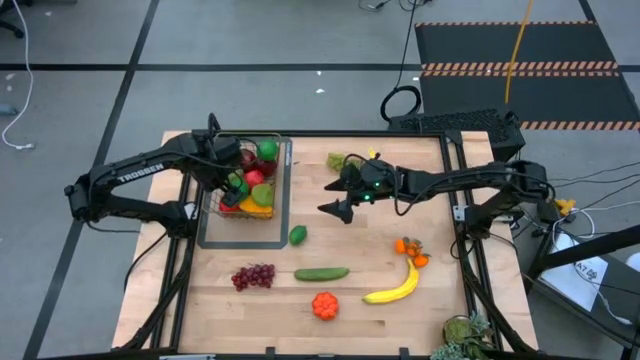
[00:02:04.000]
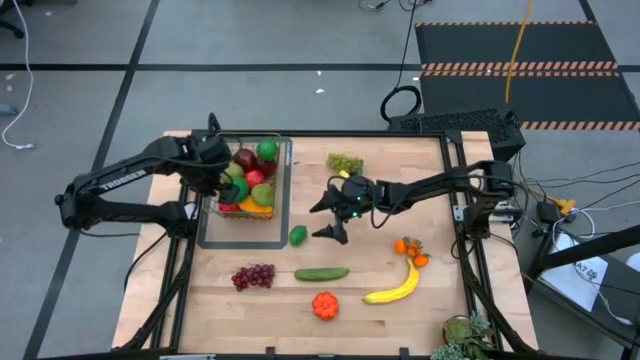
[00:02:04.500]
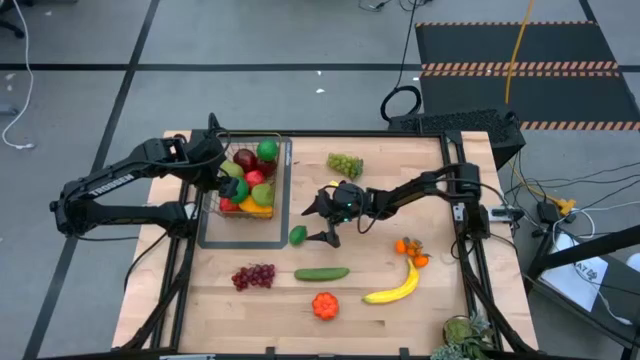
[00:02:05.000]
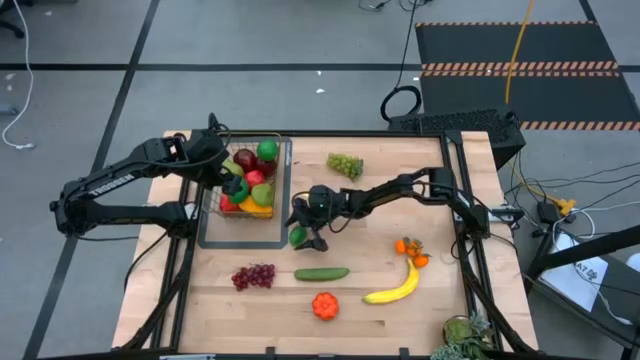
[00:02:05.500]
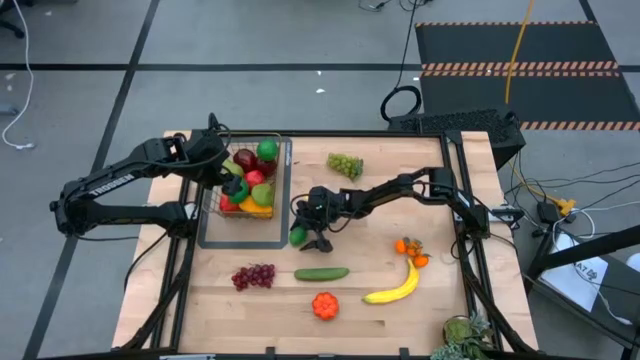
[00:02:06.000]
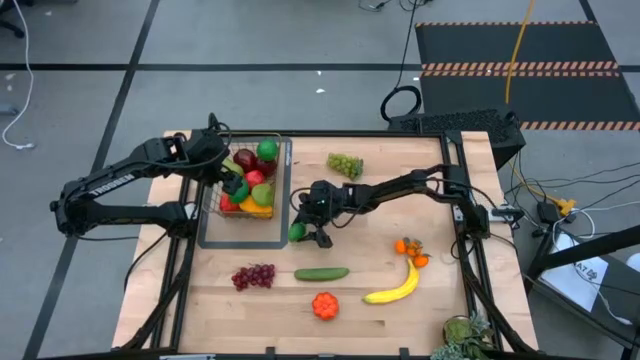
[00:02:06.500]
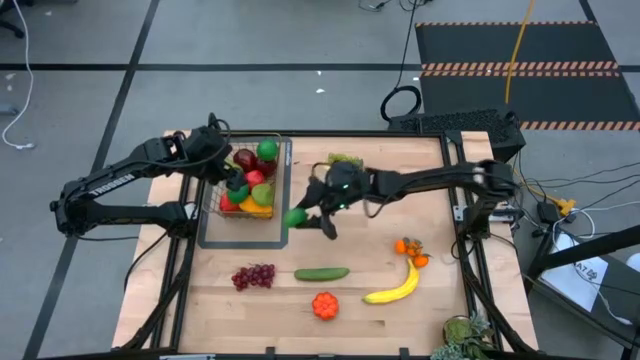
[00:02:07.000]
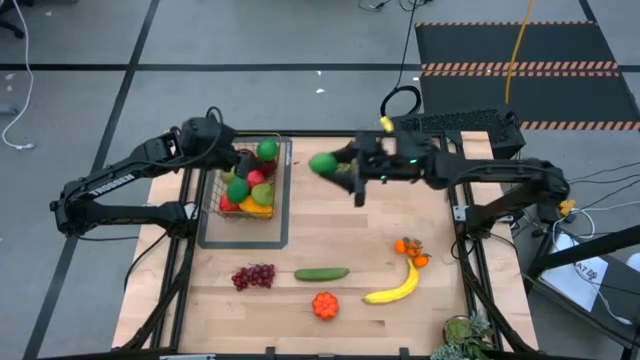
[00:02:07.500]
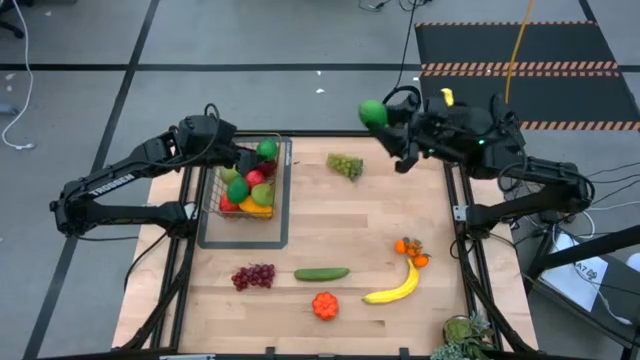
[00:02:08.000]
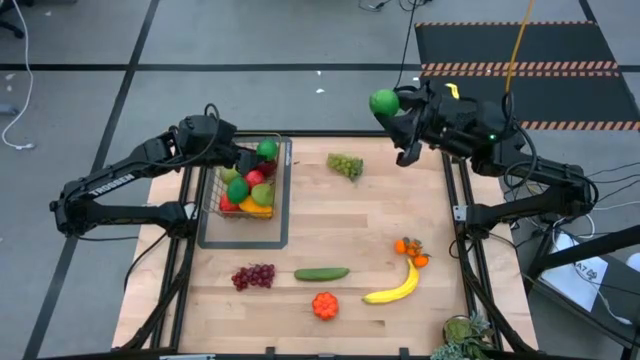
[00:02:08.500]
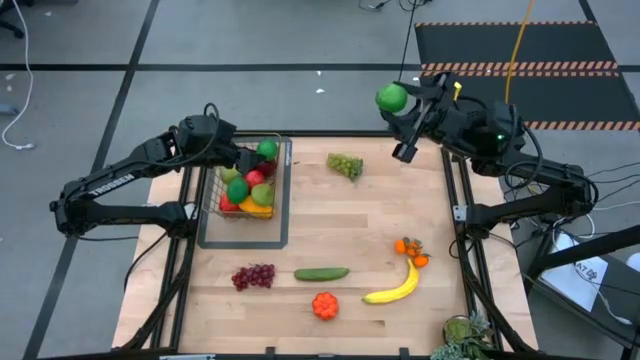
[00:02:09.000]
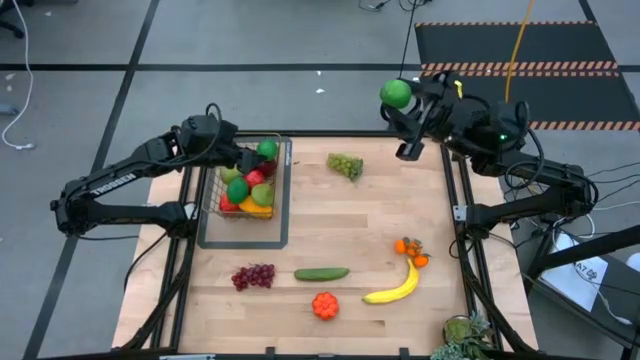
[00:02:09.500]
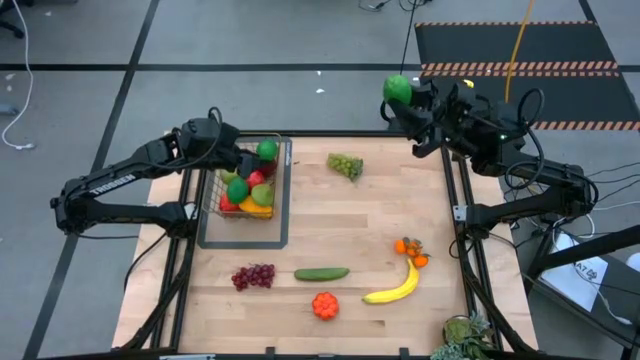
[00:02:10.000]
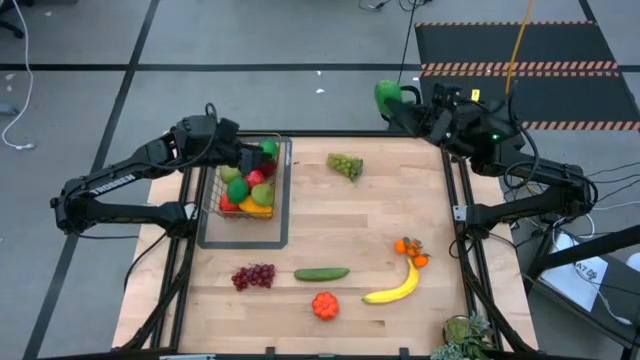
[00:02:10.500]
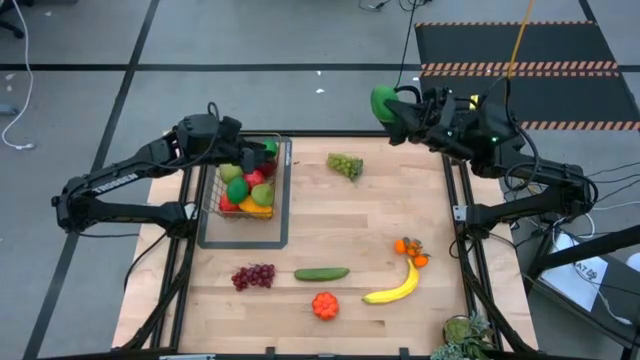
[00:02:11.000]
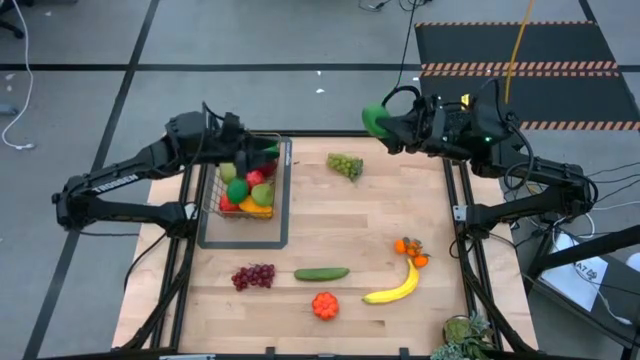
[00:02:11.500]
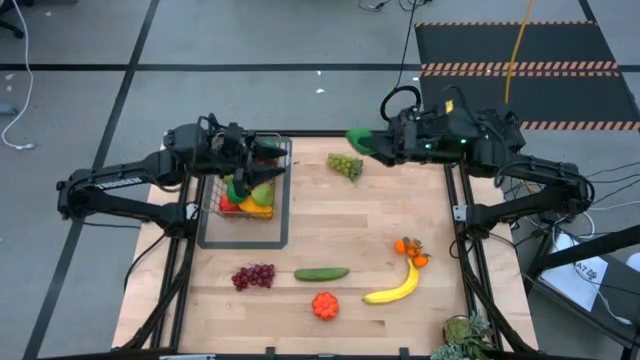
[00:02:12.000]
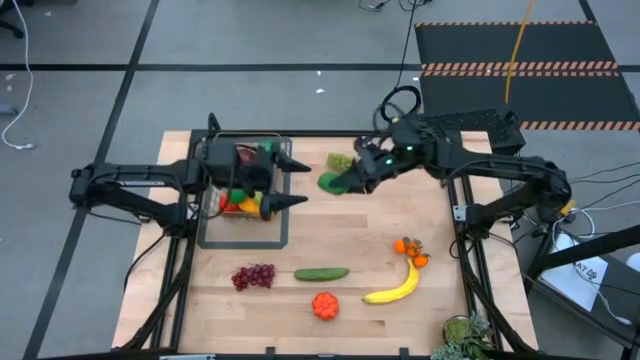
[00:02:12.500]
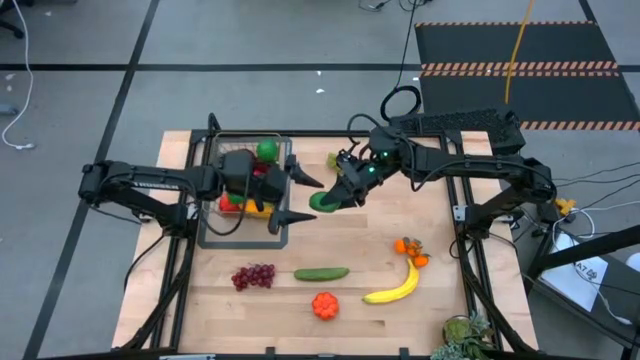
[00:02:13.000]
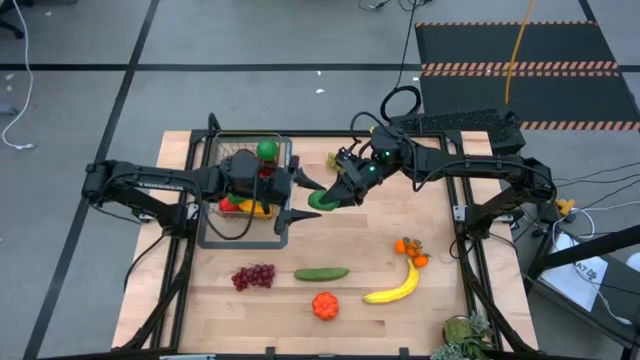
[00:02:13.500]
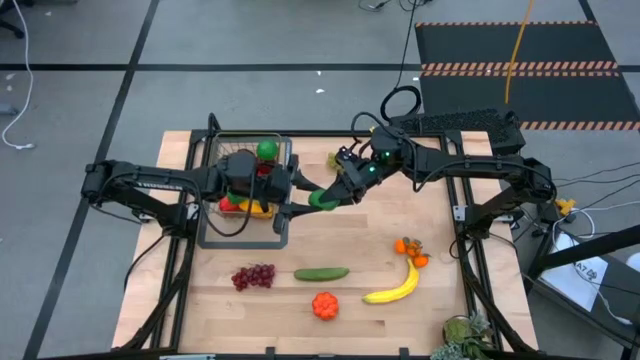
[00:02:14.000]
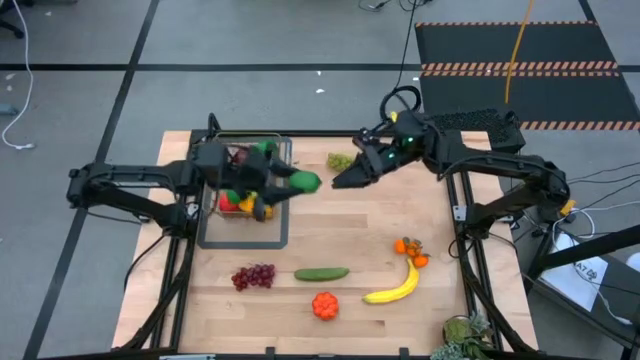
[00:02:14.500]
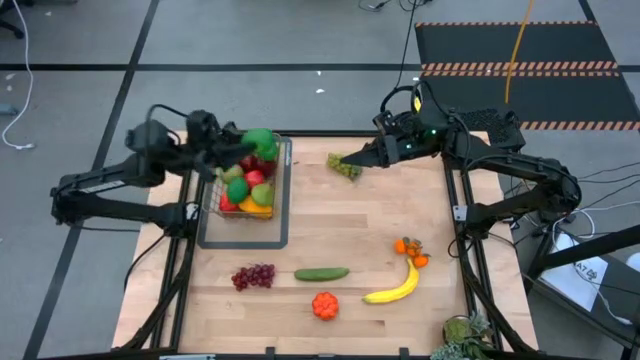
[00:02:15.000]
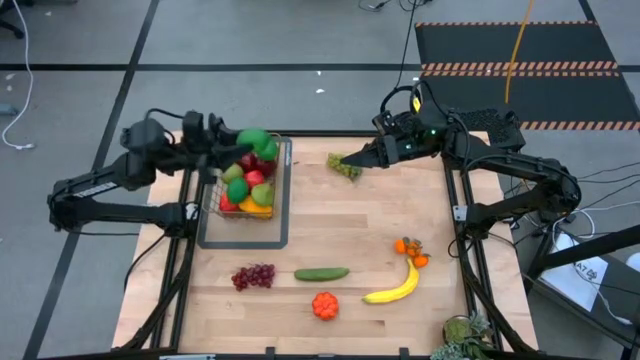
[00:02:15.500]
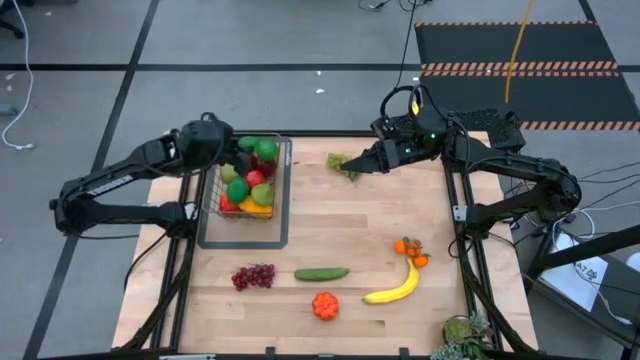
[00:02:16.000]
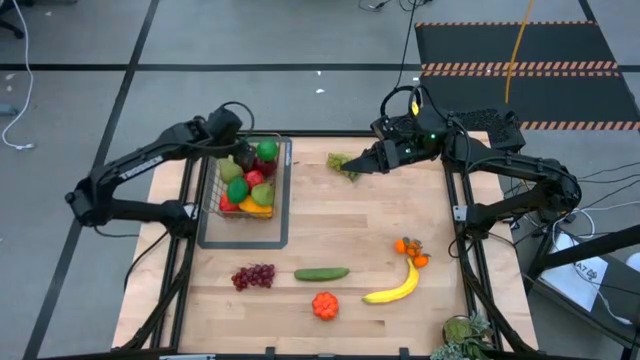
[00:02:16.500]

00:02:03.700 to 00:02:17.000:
Task: Build produce basket
Put the lime into the wire basket

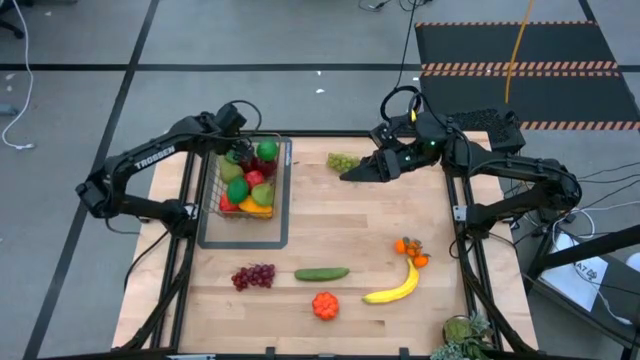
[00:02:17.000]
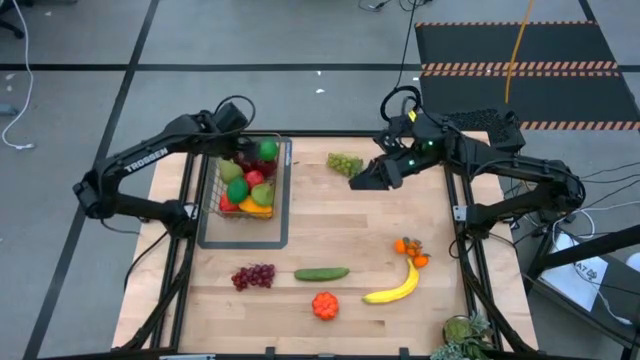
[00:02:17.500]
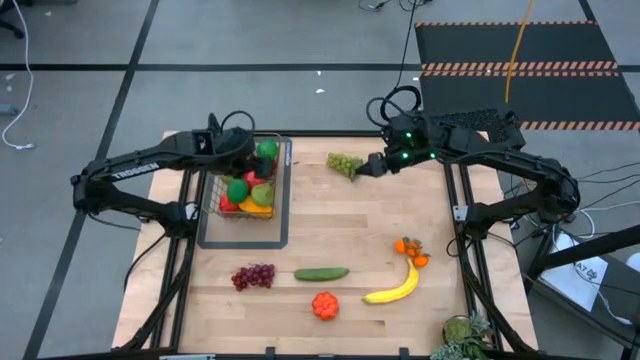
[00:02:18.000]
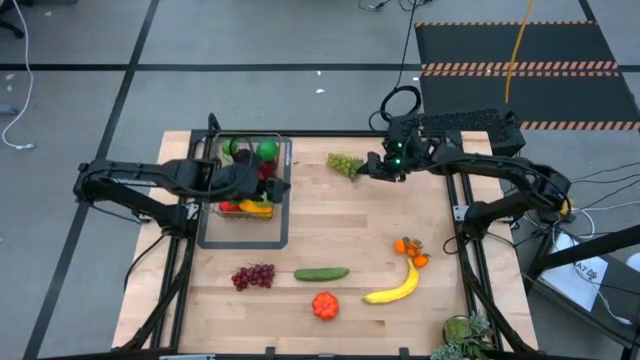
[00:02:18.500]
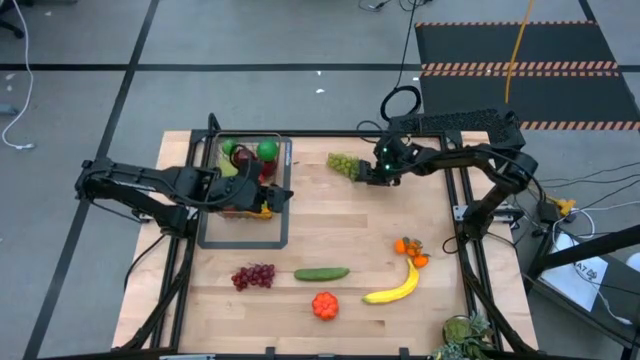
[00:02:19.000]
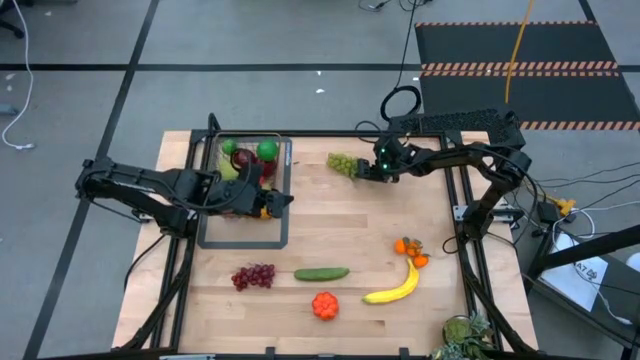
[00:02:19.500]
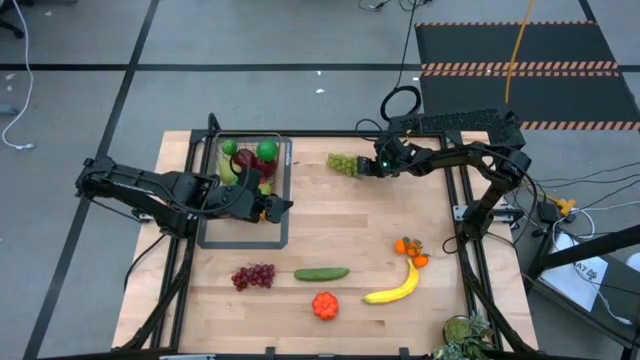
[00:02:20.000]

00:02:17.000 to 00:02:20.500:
Put the cucumber into the wire basket

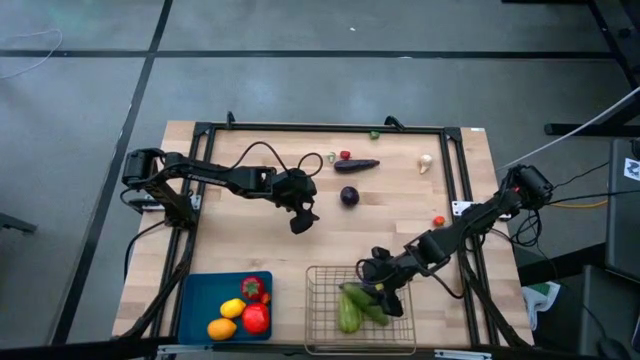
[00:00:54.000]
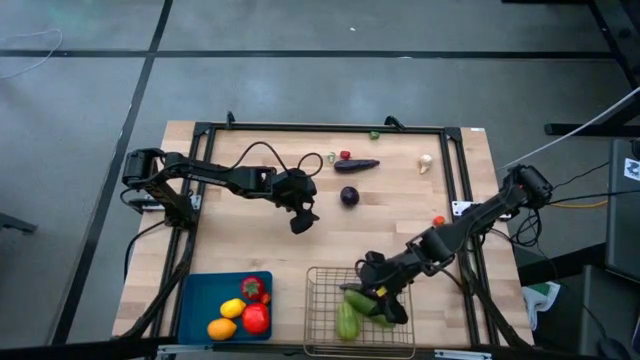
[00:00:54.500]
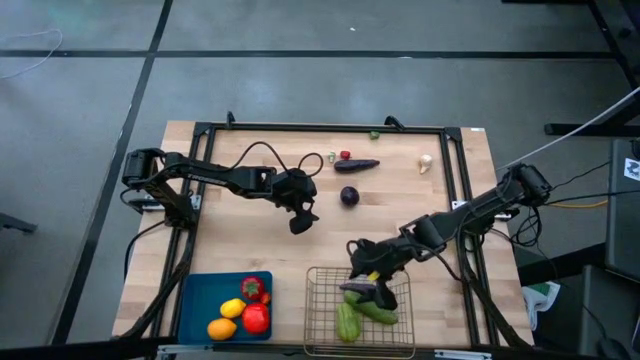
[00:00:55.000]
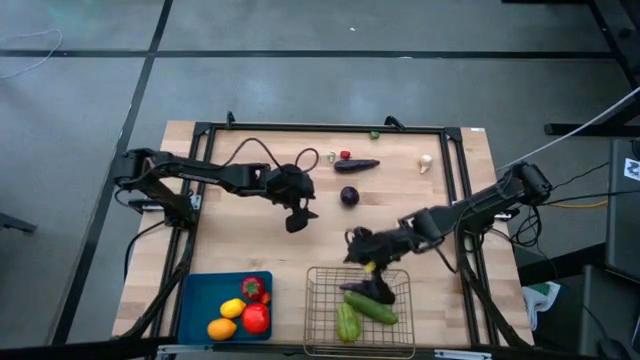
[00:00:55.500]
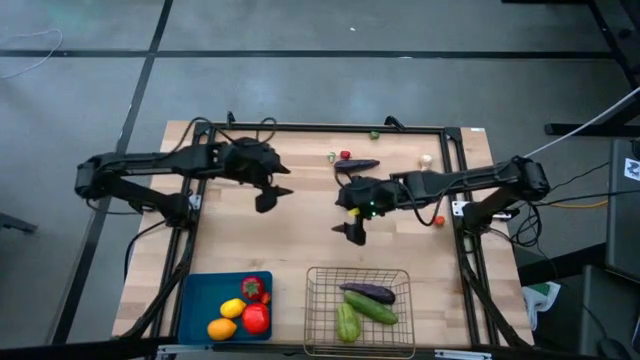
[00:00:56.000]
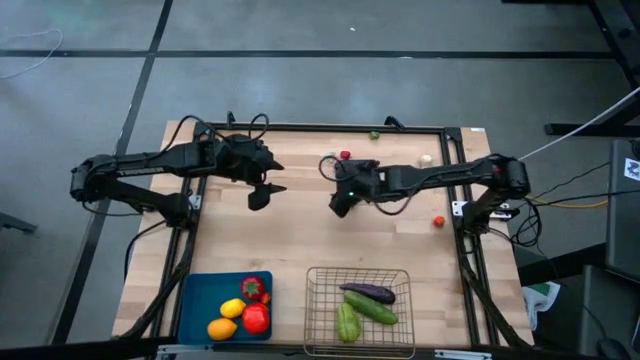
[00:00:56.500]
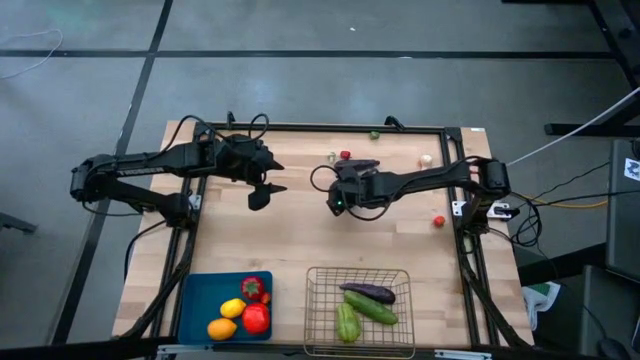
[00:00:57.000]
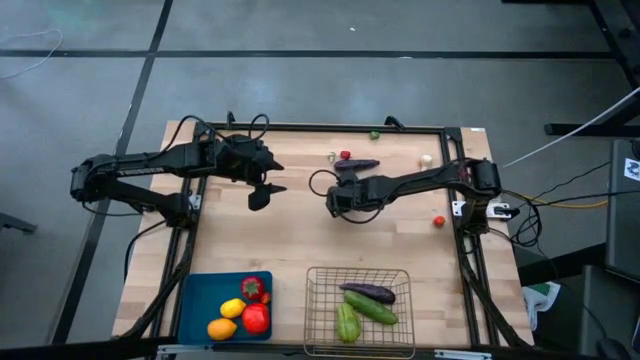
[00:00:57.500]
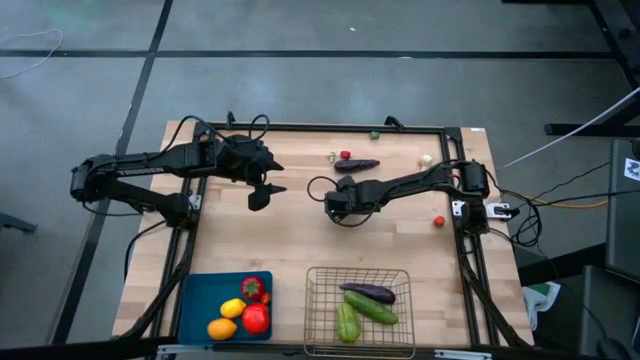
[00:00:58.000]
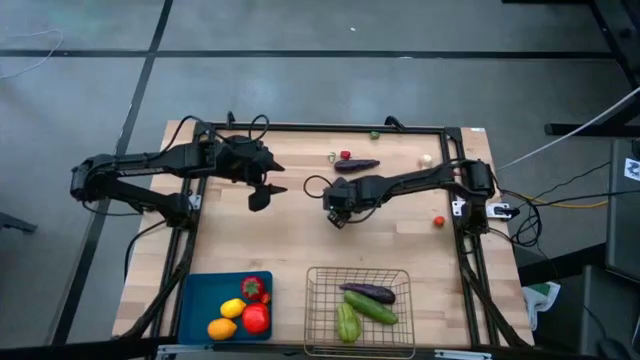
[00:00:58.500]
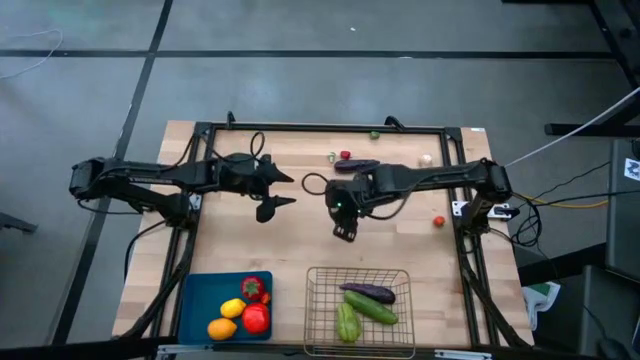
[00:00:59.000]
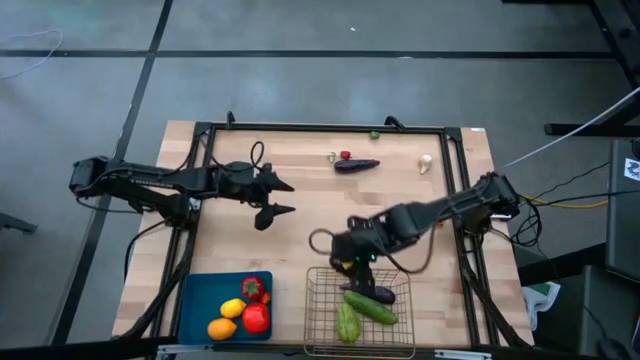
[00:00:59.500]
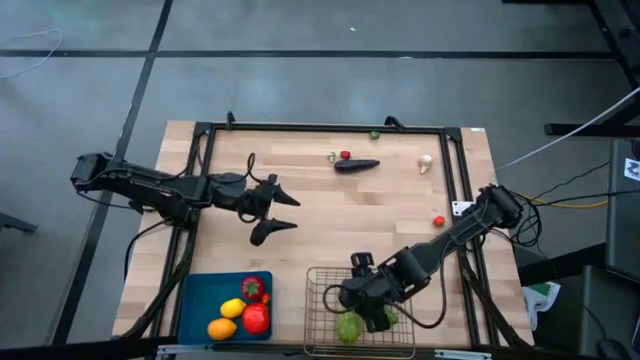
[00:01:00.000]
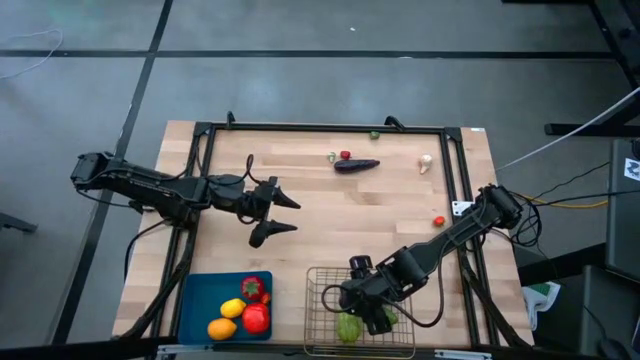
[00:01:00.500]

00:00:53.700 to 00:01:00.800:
Task: Sort produce into baskets
Put the plum into the gold wire basket
